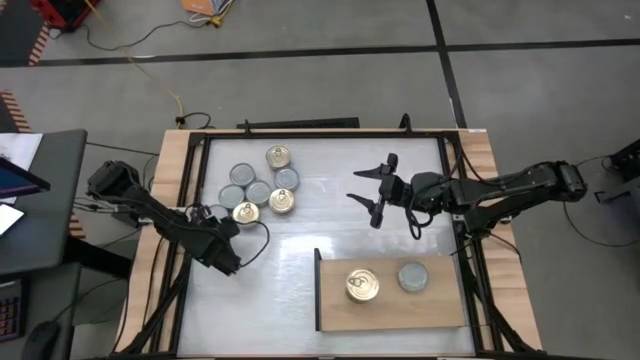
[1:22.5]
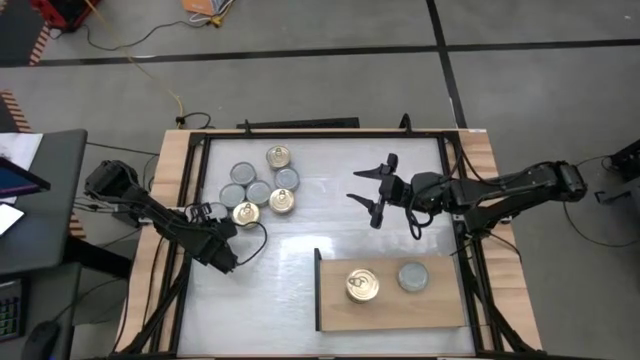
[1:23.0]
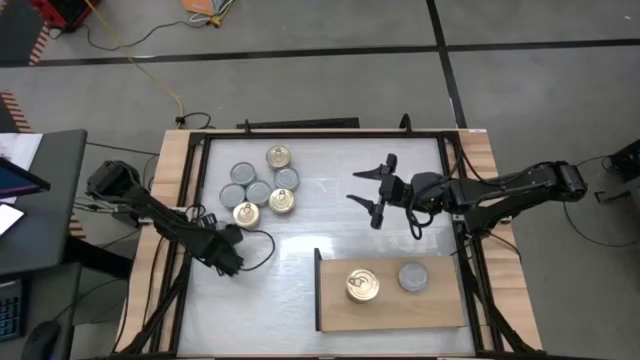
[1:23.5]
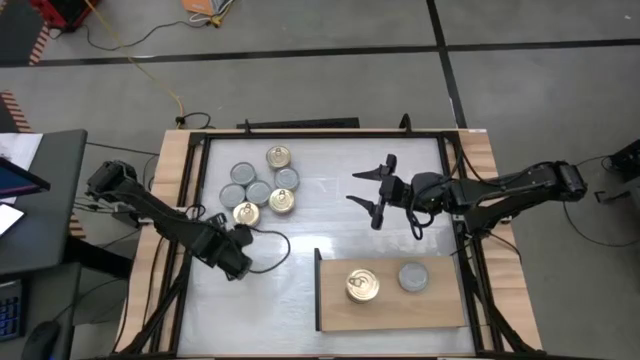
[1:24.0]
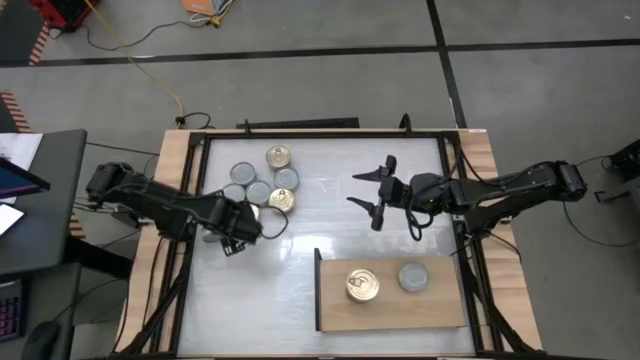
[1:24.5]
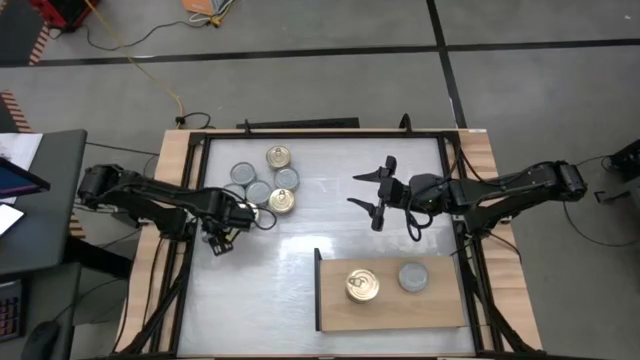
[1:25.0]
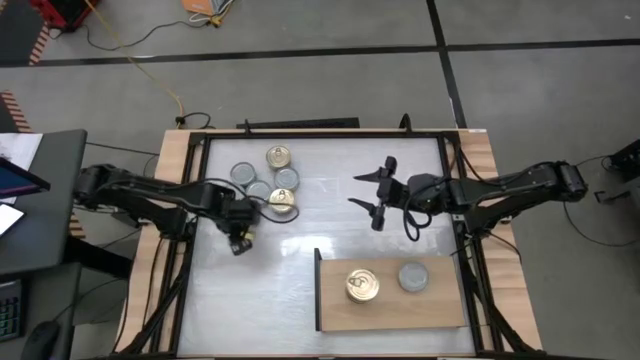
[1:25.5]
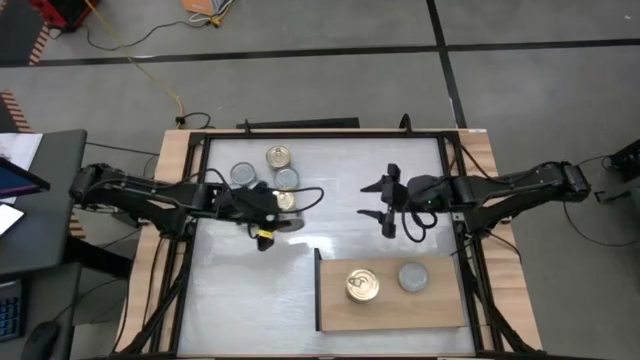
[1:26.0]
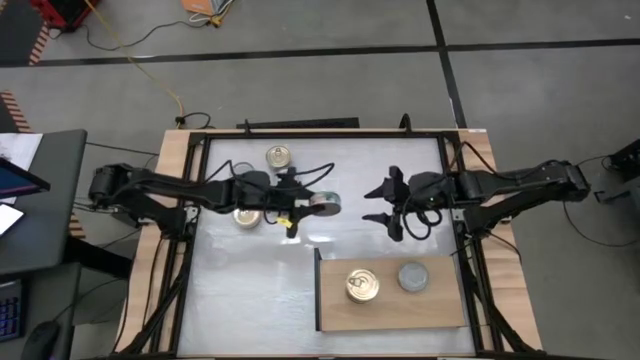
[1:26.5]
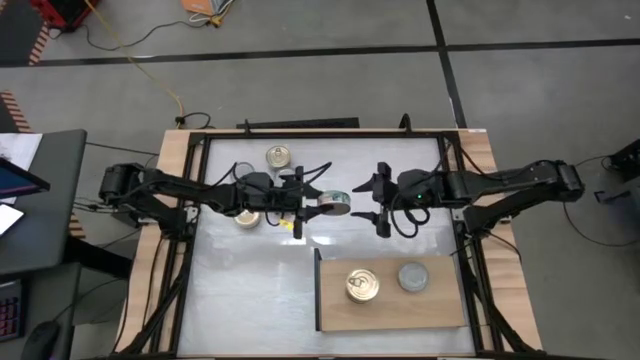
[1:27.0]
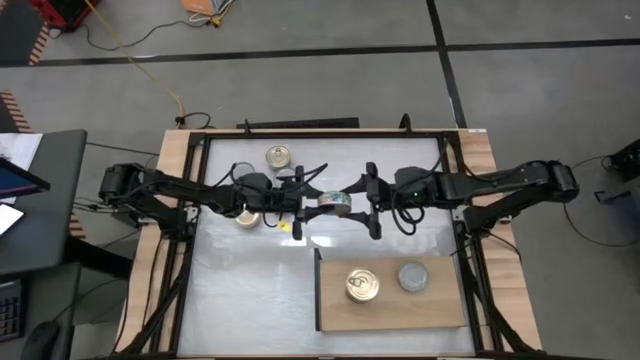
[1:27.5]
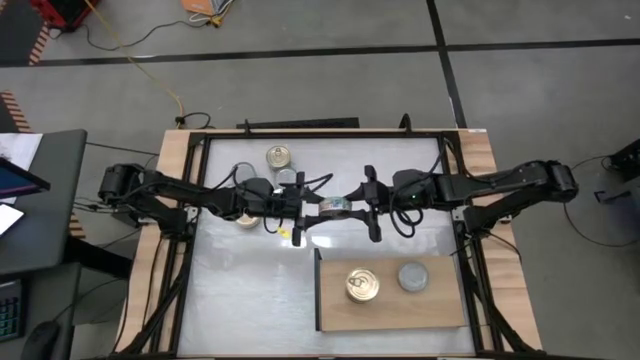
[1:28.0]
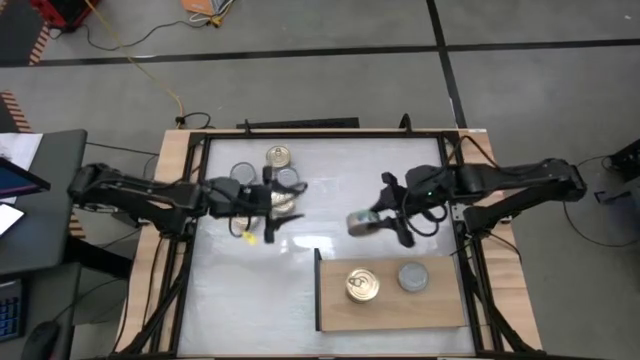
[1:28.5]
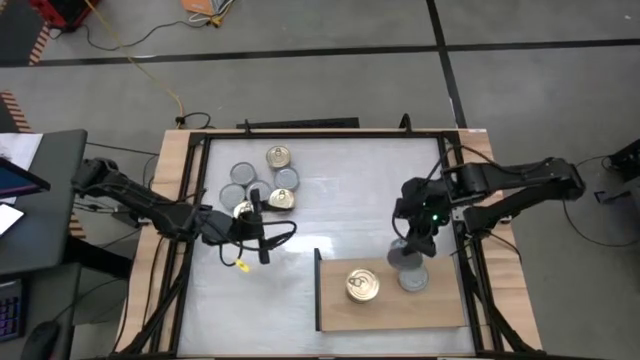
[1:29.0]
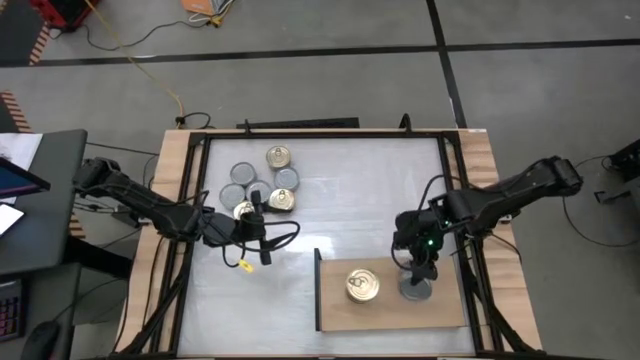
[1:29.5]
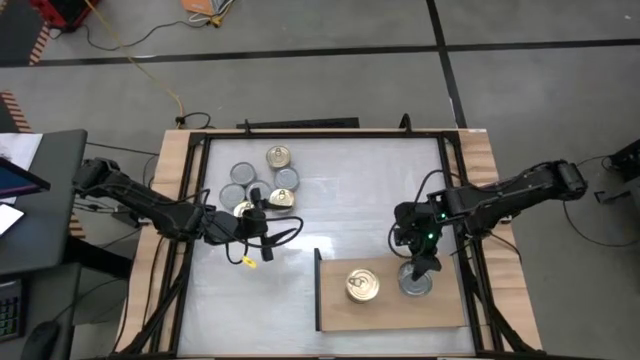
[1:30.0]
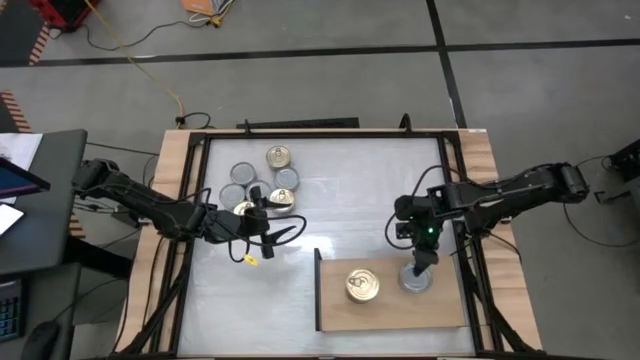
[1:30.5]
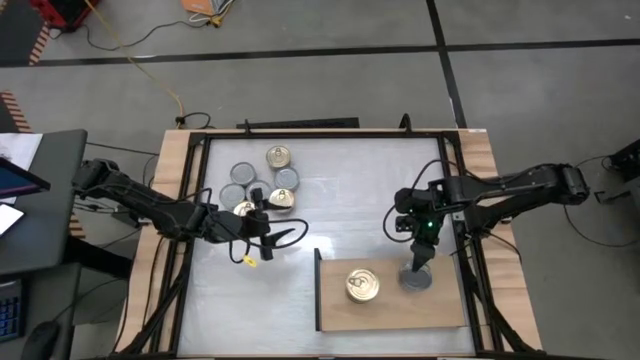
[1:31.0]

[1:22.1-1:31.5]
Task: Stack canned seafood by type on shelf
Stack the green tuna can on top of the green tuna can on the shelf

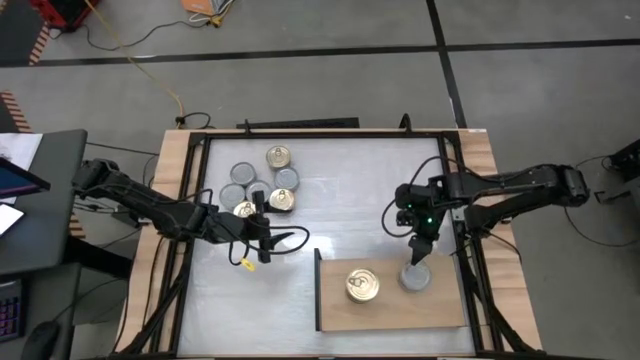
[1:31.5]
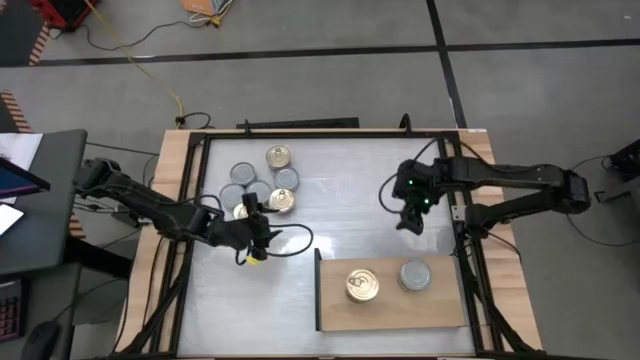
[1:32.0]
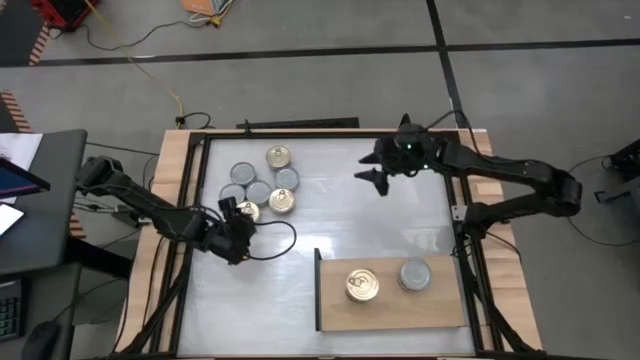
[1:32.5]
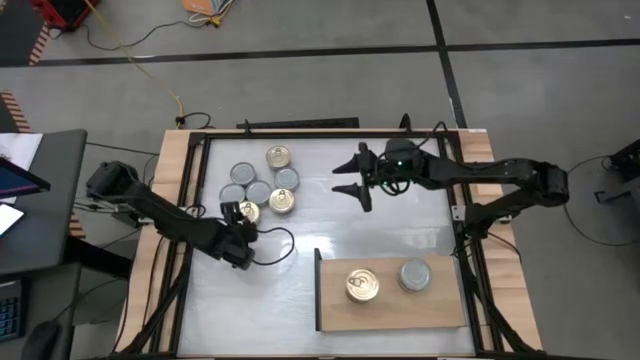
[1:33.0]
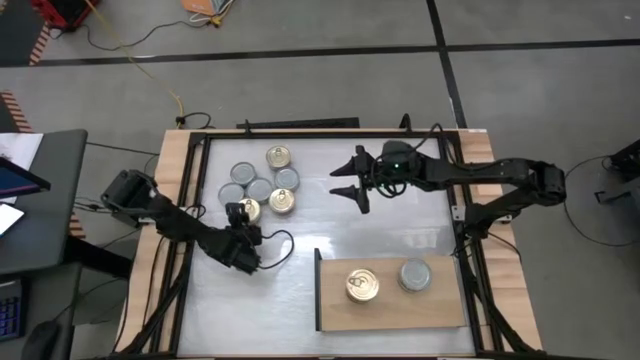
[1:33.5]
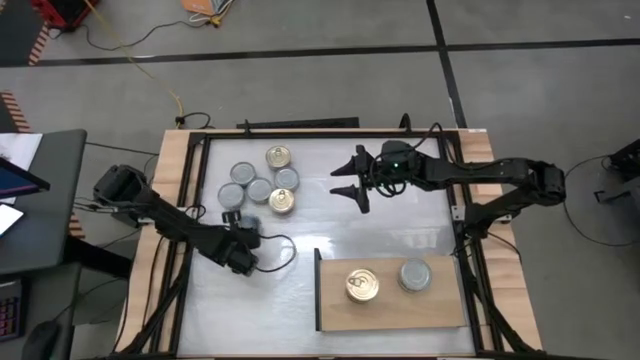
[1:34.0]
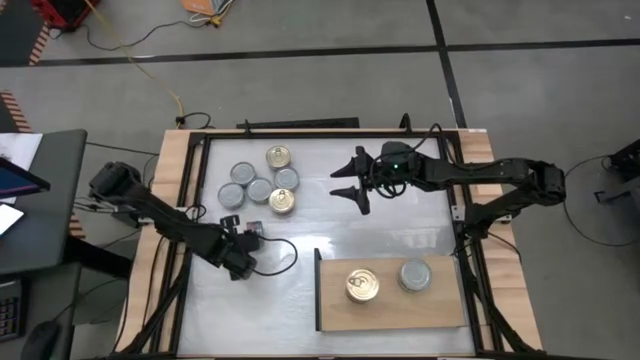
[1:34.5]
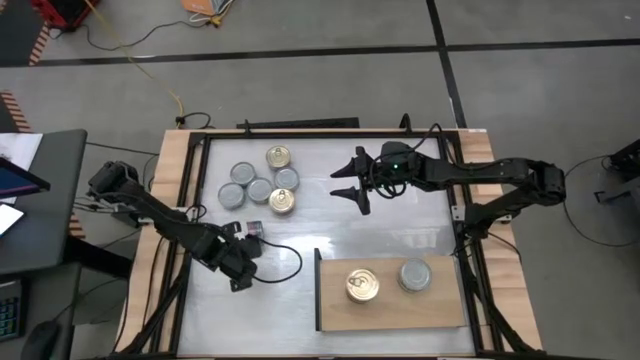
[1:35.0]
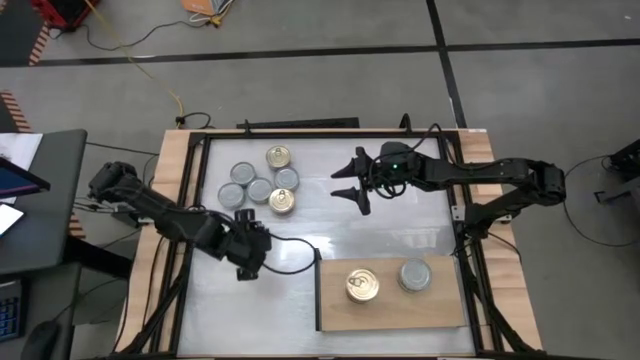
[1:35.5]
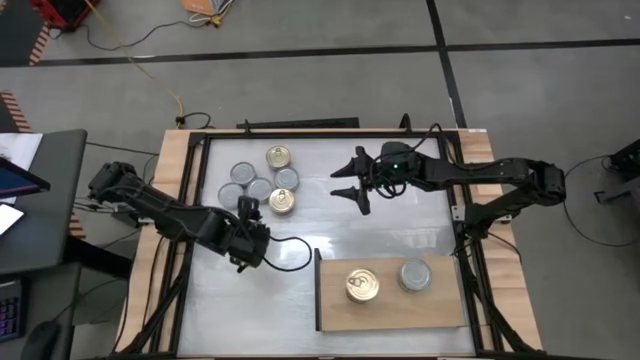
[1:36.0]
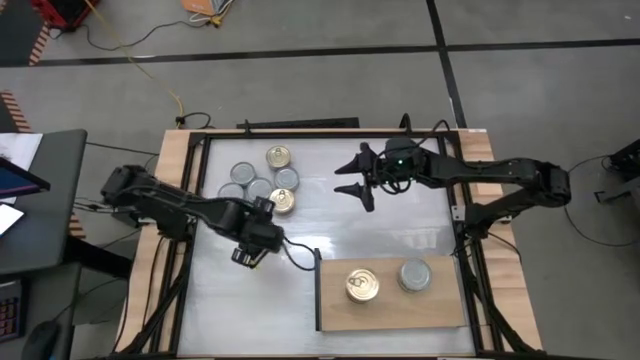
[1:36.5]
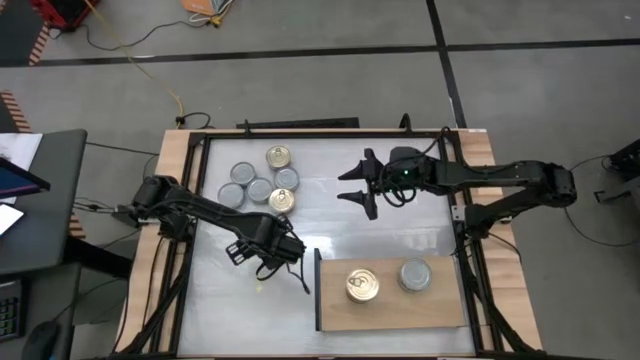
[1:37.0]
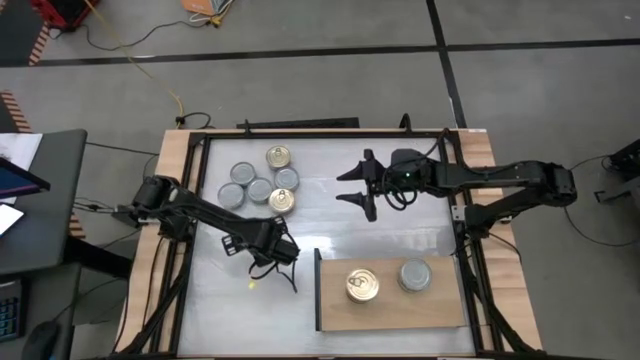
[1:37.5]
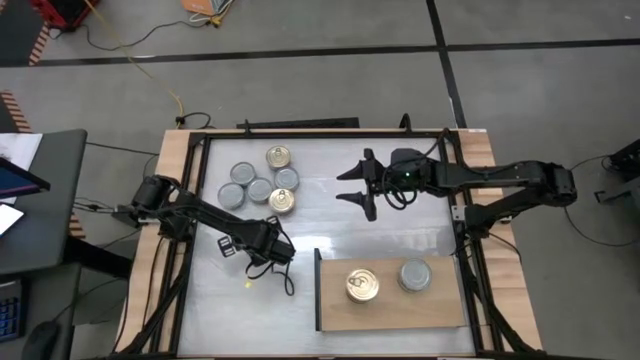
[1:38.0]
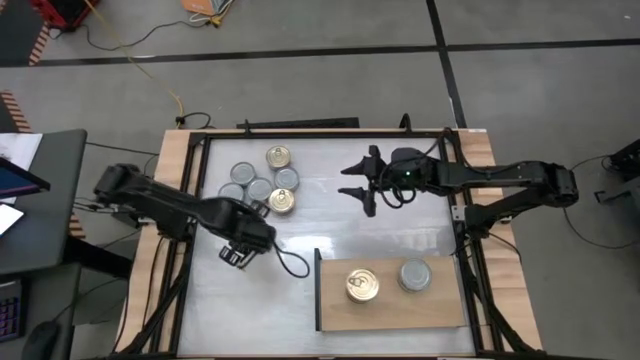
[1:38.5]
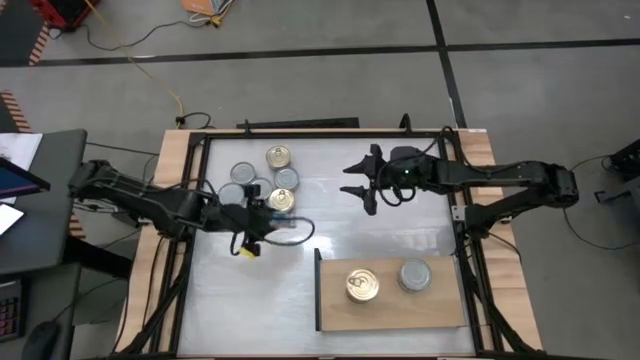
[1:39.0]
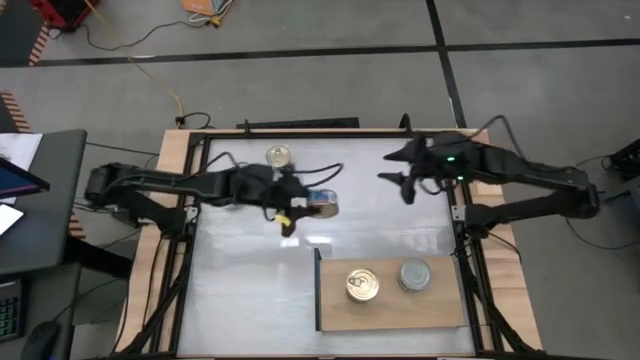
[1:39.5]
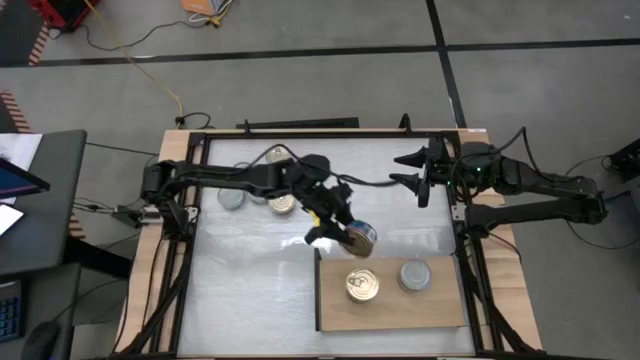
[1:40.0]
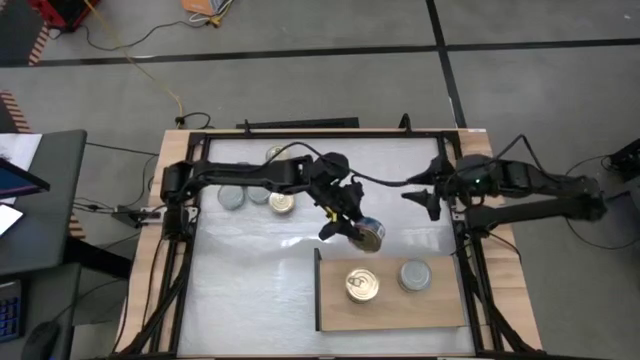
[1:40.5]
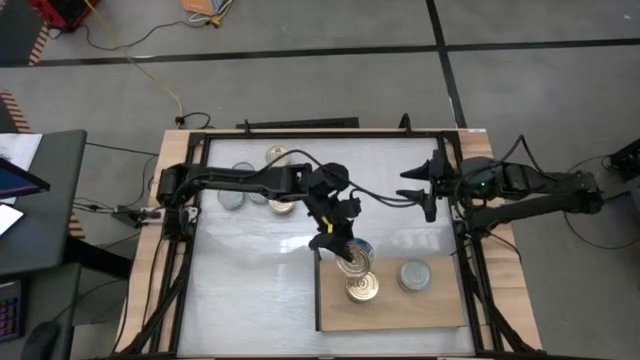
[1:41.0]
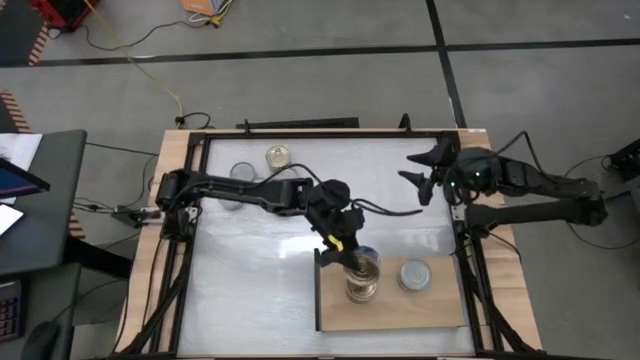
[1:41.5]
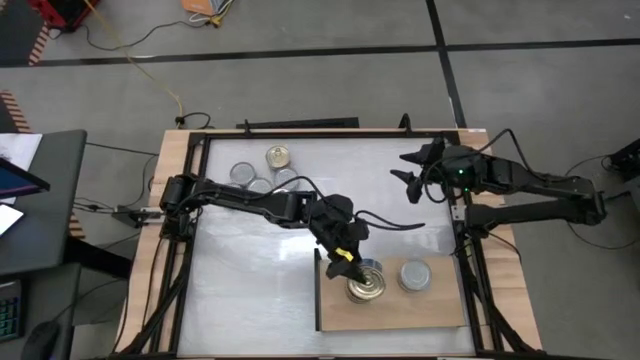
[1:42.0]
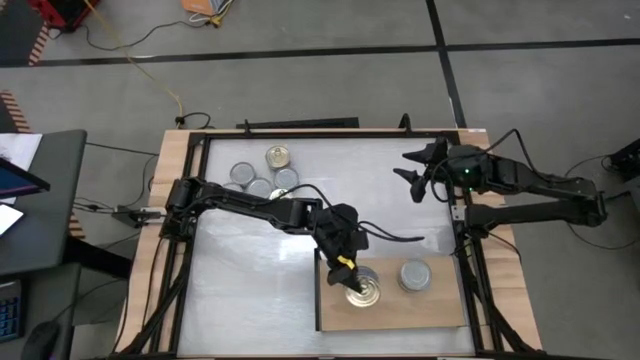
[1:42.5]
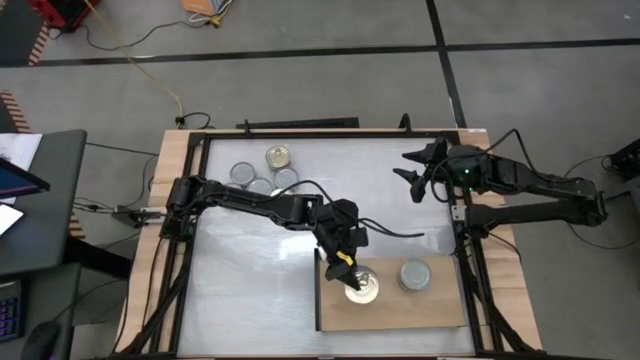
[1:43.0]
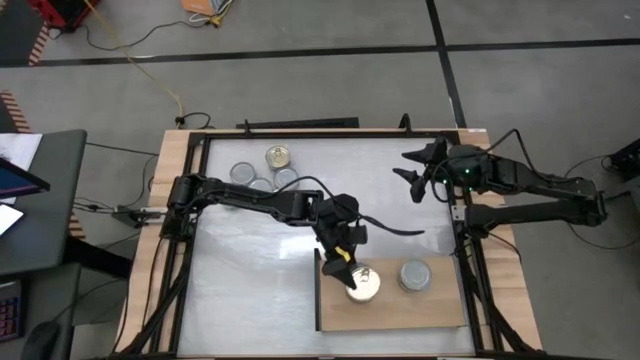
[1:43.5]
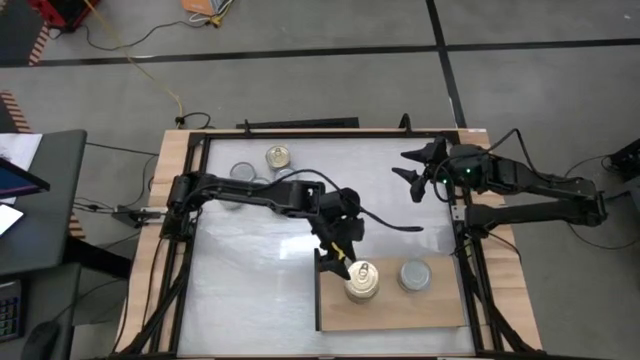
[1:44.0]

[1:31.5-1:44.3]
Stack the blue pink tuna can on top of the blue pink tuna can on the shelf
